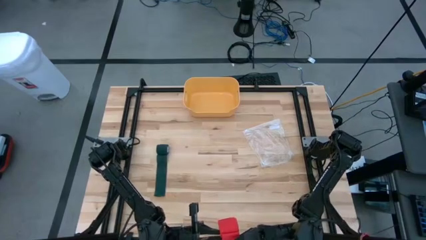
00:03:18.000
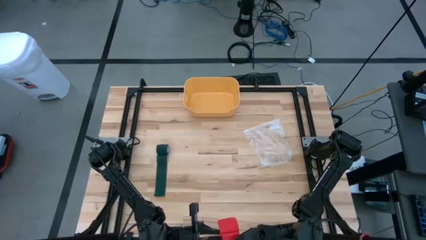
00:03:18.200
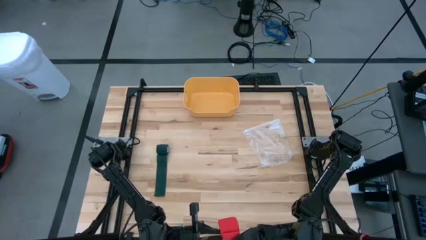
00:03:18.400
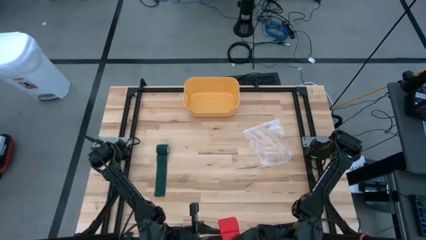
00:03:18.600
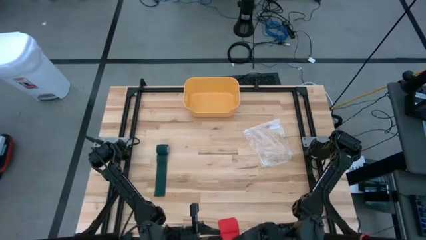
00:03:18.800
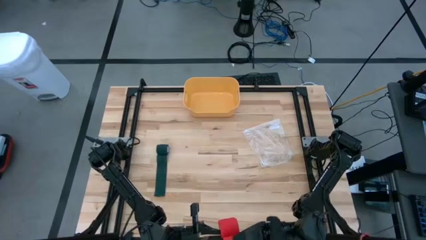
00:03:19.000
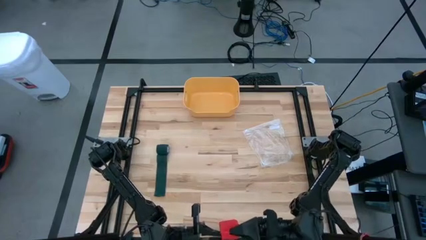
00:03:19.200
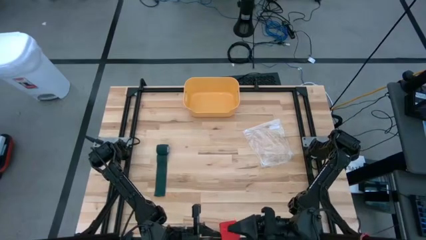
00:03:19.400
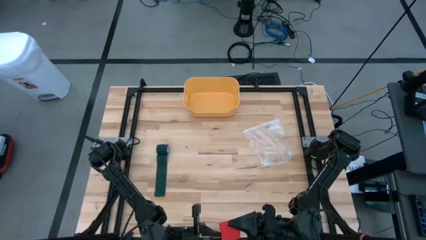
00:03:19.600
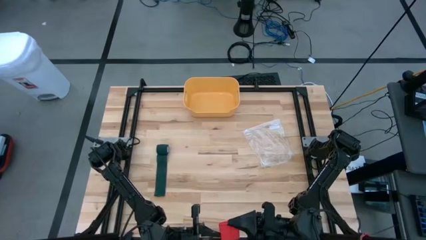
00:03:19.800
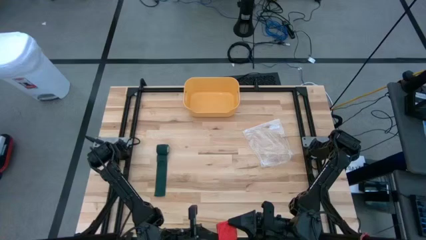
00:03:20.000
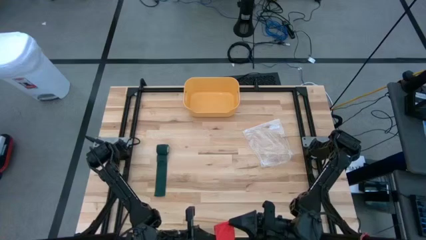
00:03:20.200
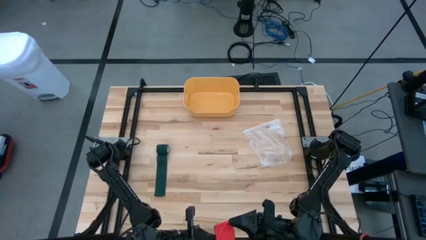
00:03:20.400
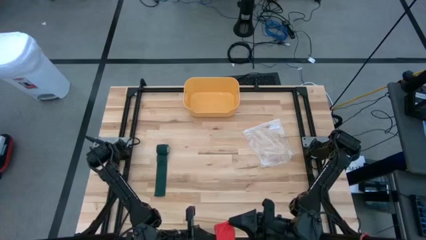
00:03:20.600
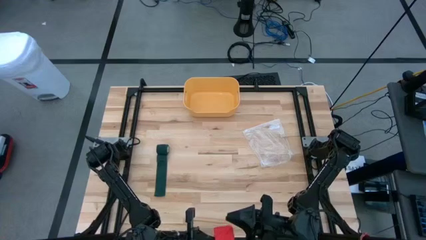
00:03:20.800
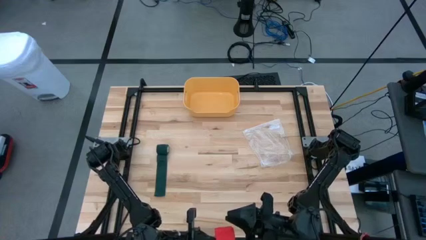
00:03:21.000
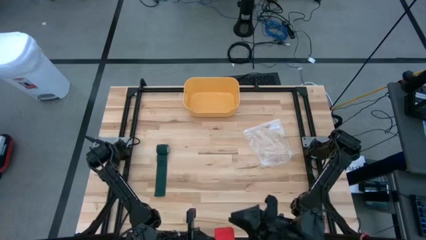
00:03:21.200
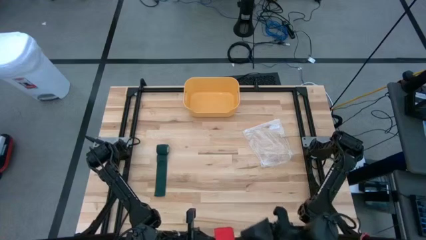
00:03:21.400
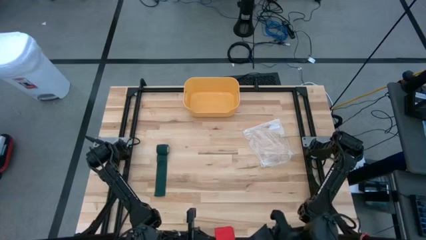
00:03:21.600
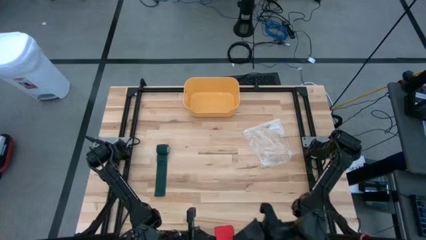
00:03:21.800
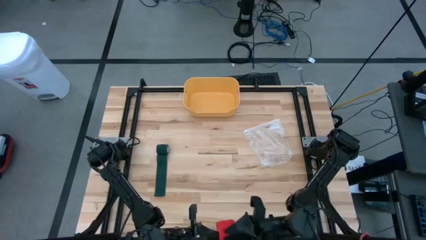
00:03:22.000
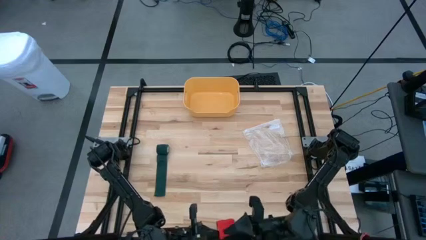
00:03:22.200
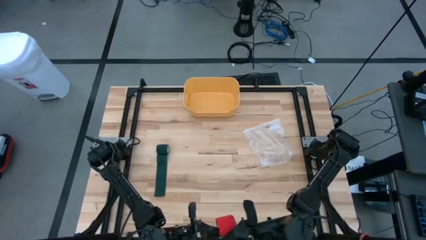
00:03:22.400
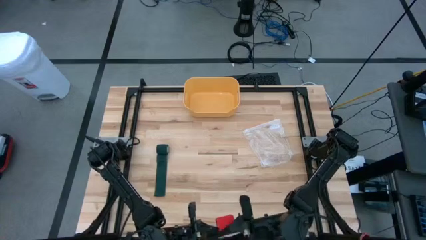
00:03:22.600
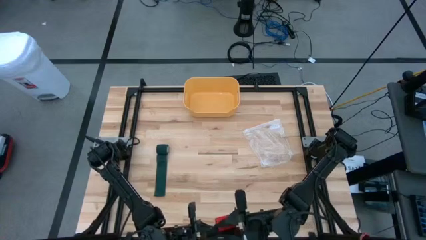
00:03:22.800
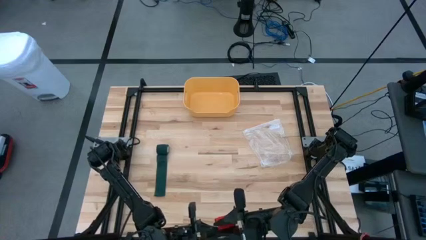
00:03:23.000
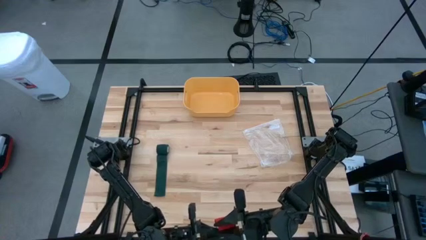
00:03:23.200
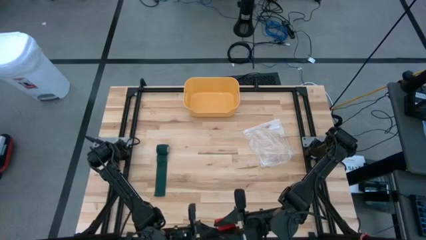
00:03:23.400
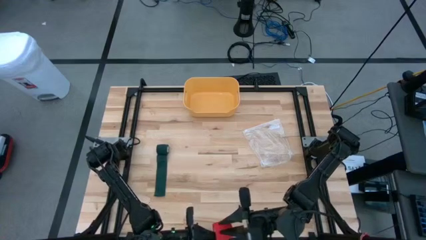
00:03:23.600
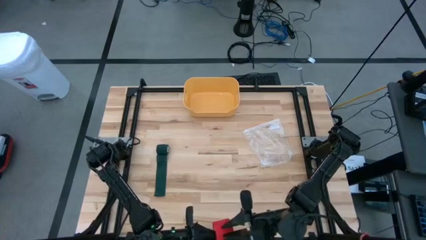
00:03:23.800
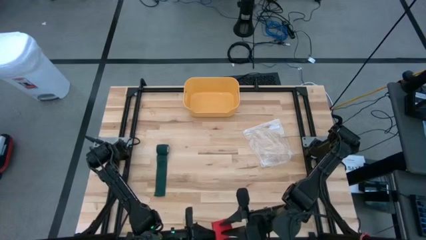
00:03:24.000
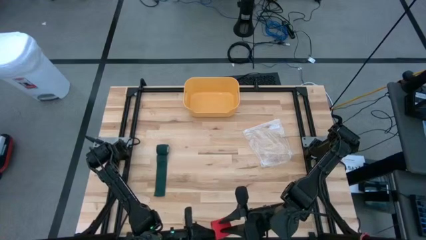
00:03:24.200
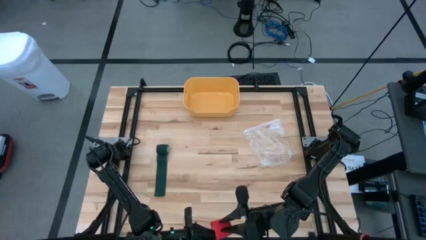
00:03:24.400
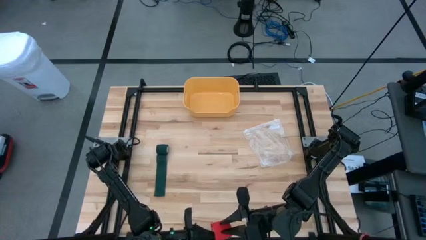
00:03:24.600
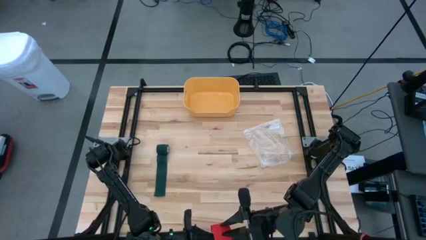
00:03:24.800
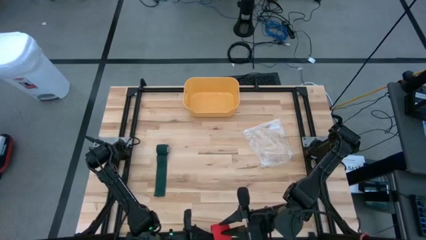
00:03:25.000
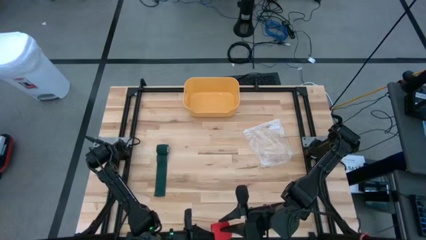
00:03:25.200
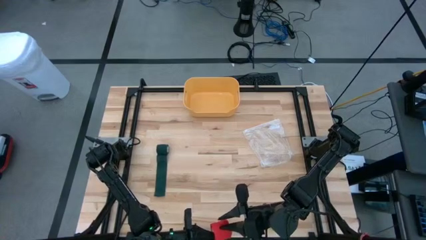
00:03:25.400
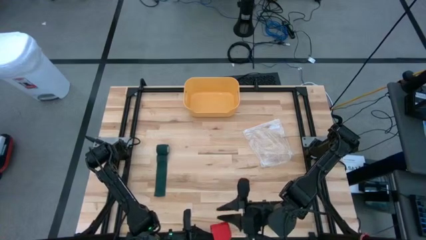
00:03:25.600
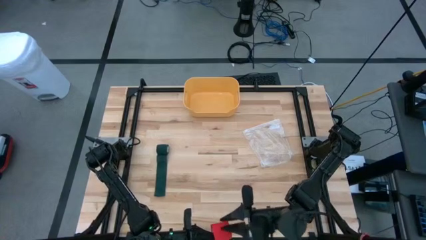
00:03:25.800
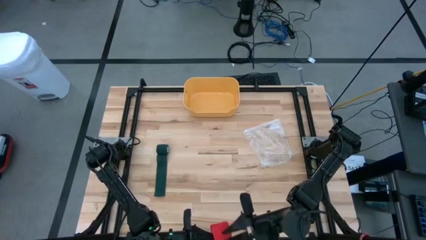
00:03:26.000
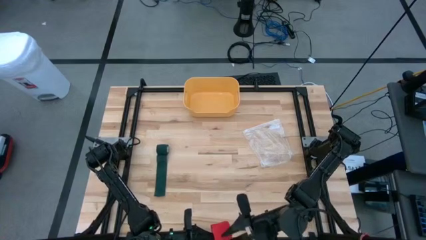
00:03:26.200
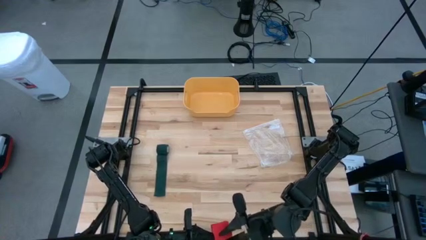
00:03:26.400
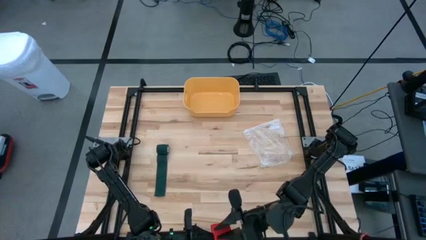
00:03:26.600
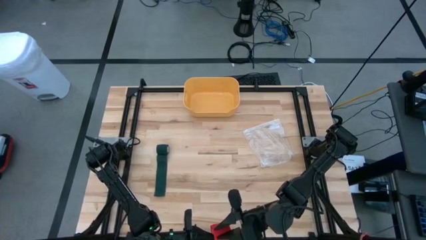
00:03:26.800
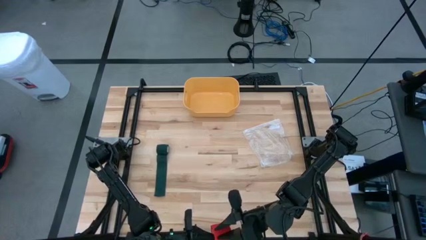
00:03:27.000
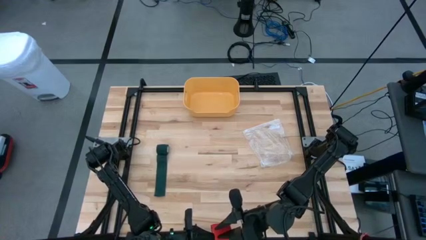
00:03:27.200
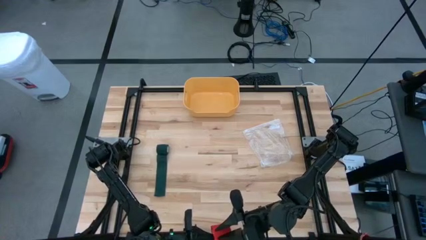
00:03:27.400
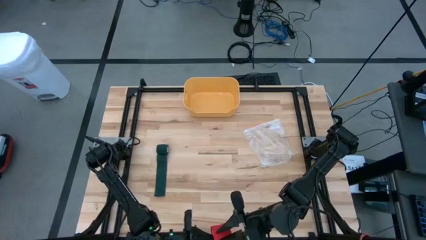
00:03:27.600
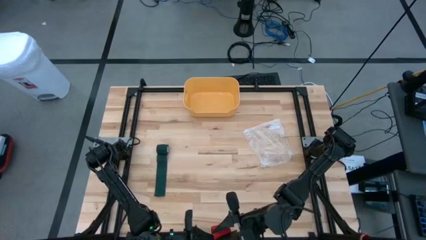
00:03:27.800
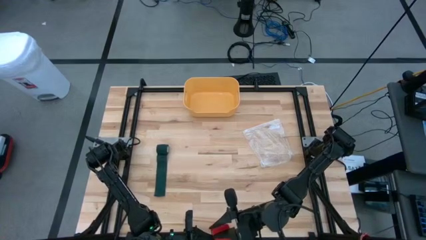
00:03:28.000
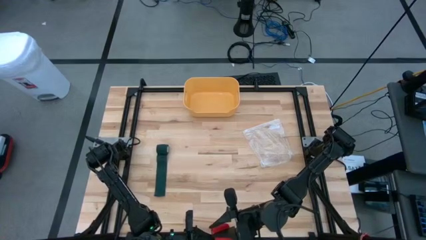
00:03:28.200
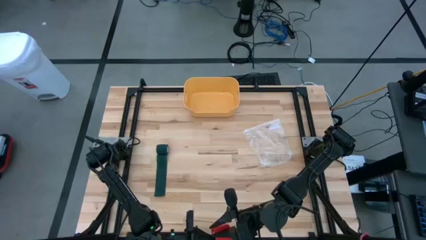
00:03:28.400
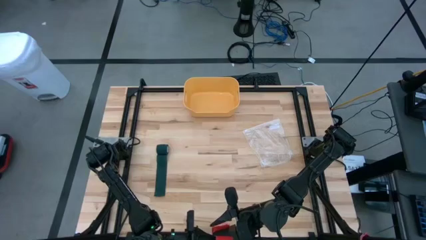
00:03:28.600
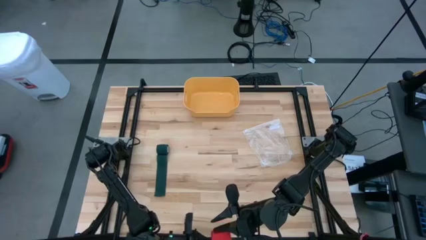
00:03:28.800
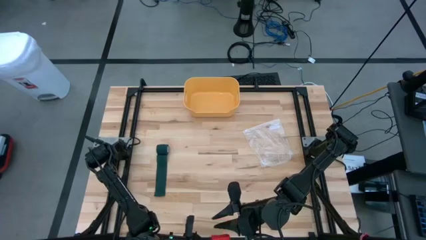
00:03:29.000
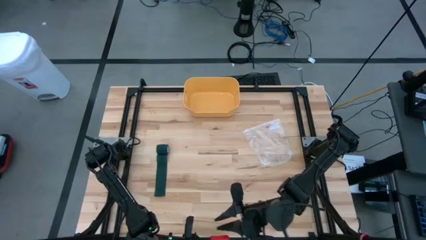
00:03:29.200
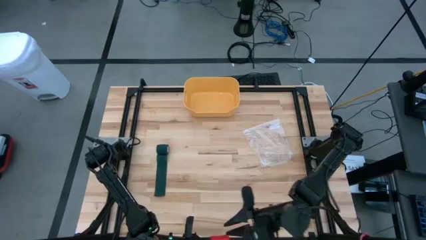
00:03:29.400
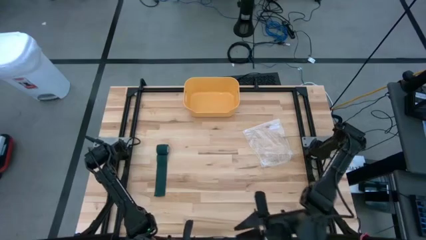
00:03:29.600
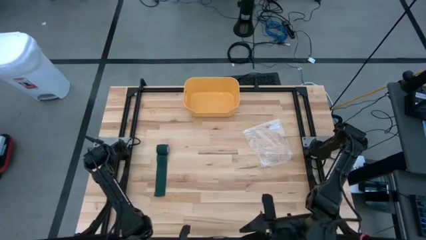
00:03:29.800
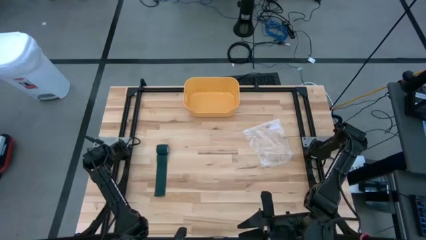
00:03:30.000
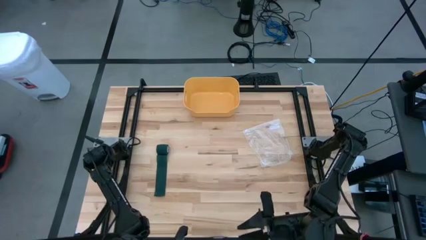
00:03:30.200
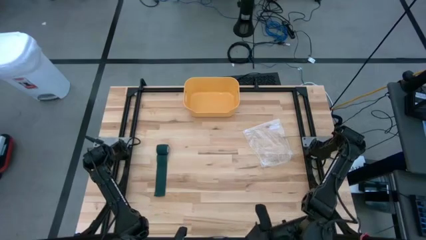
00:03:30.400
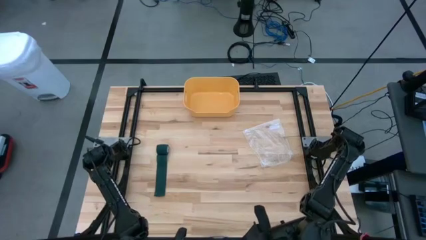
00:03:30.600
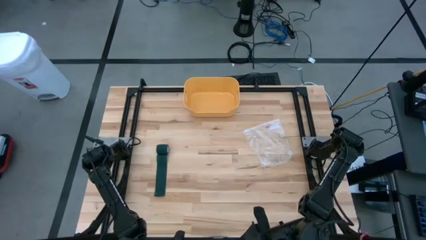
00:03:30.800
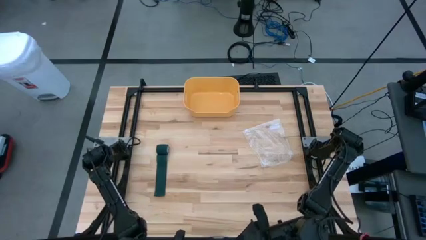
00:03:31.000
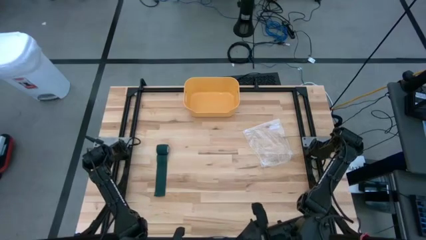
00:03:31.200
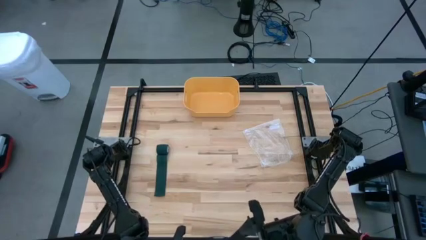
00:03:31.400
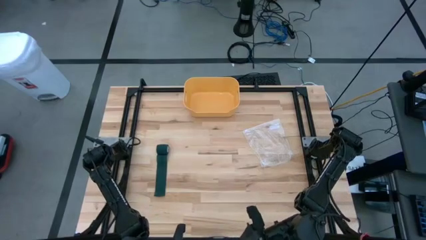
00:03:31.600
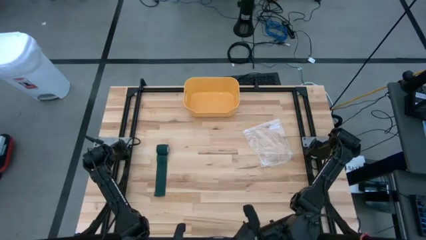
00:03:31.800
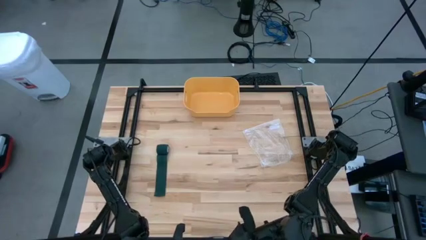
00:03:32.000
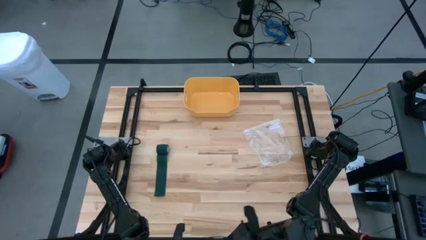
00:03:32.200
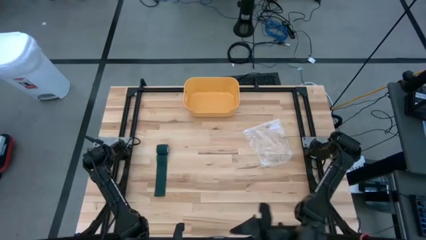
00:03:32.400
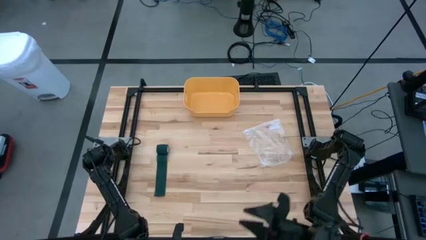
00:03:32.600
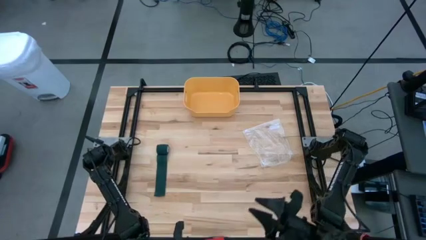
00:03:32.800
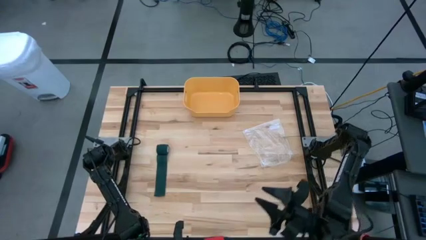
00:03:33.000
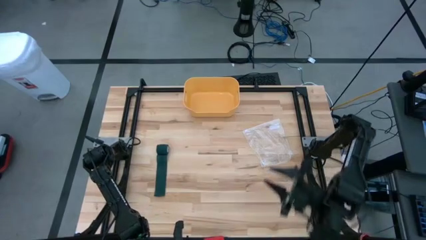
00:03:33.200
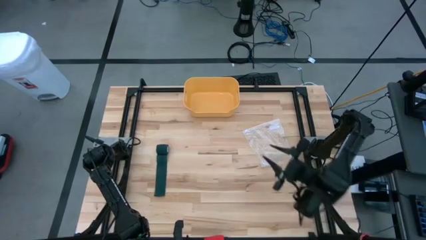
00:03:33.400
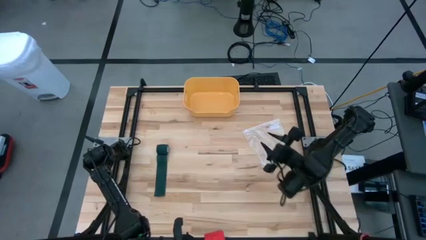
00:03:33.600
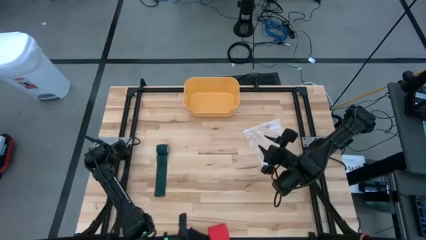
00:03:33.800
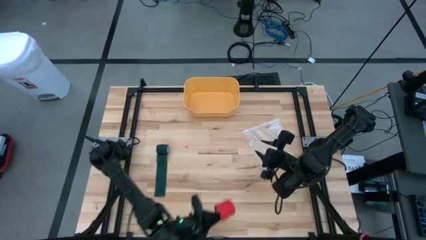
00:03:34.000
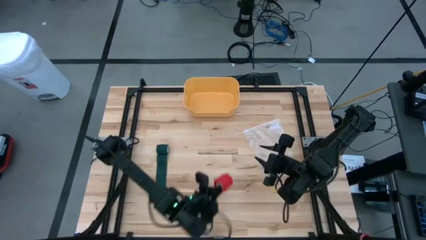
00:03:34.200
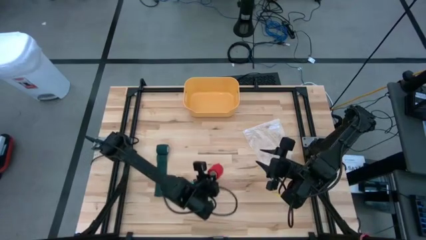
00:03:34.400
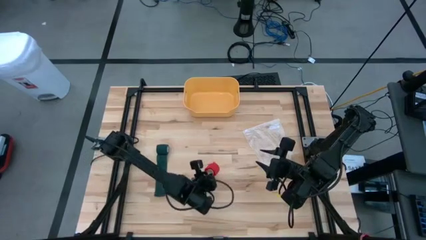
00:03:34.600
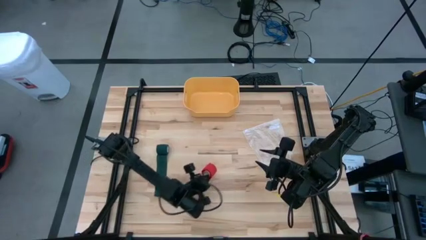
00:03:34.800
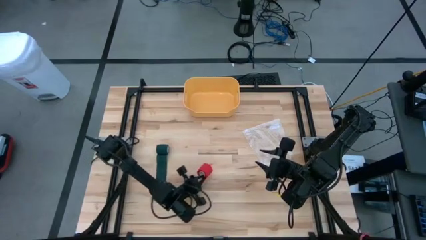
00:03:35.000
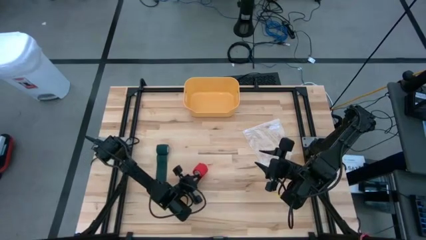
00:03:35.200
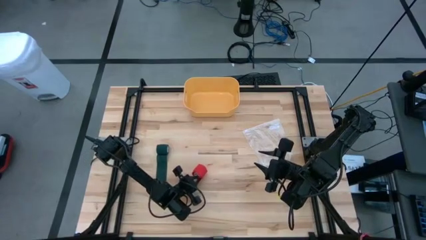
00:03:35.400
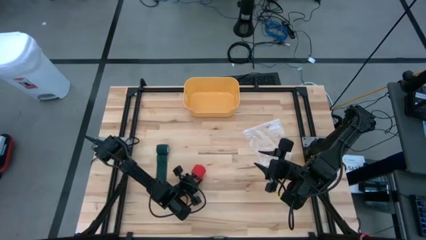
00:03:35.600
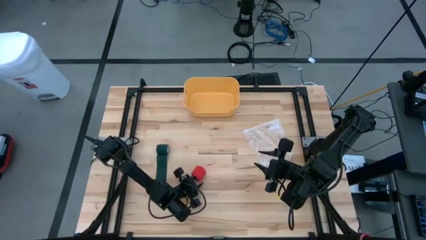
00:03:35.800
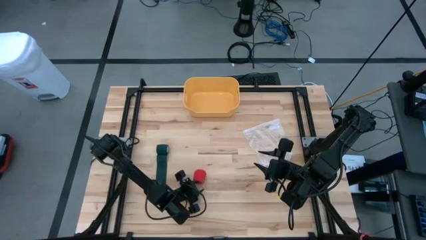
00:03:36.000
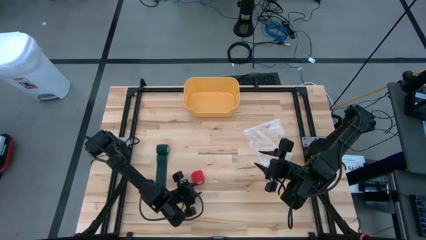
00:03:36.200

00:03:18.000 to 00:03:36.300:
Task: Roll bandage
Roll the red bandage
